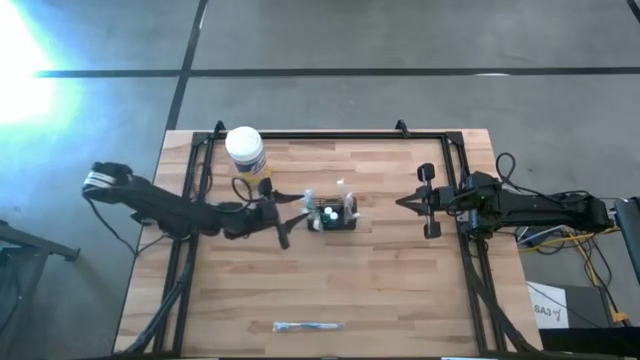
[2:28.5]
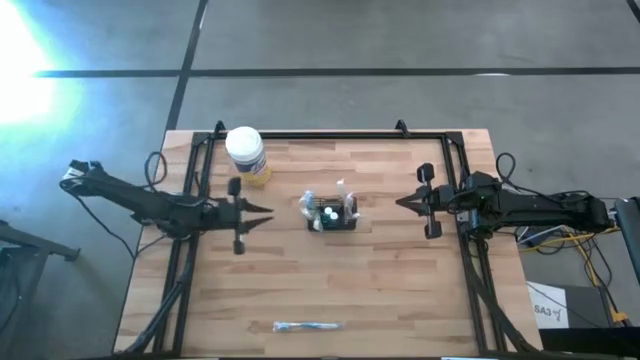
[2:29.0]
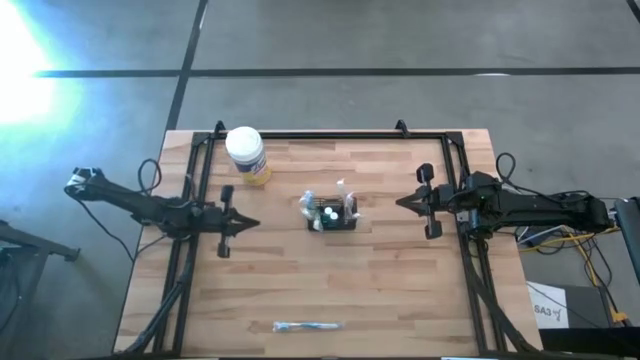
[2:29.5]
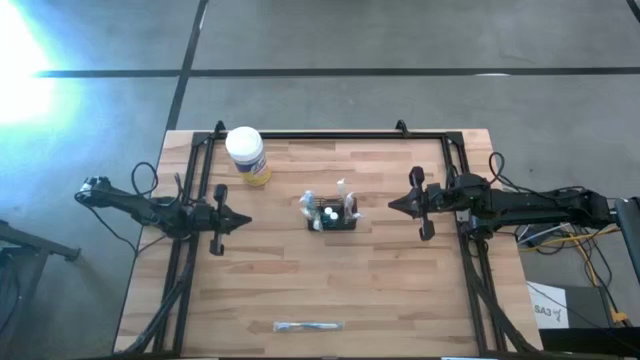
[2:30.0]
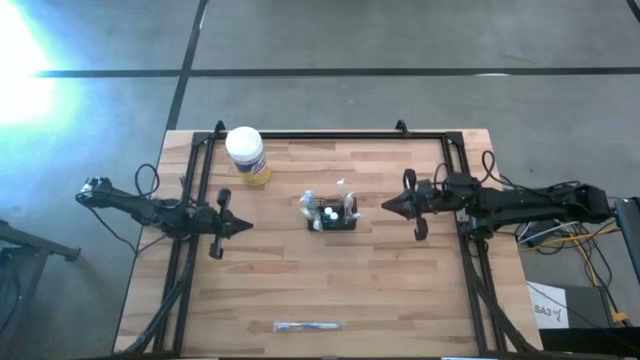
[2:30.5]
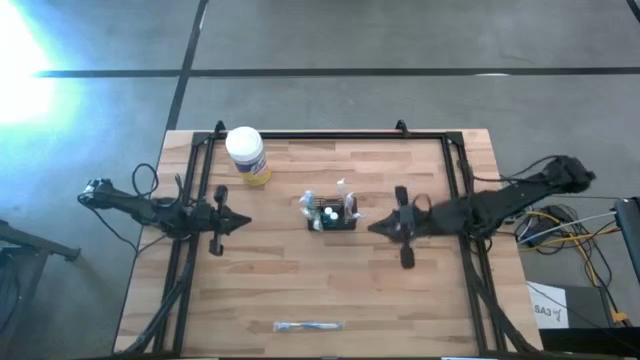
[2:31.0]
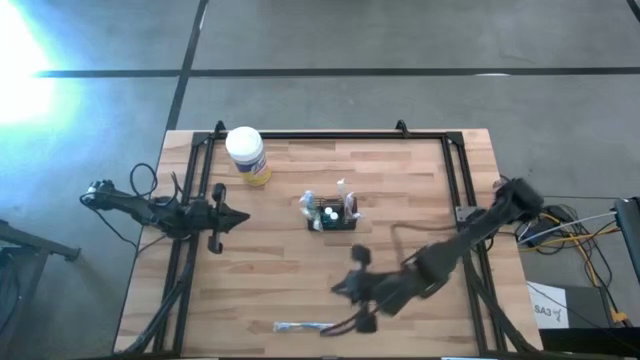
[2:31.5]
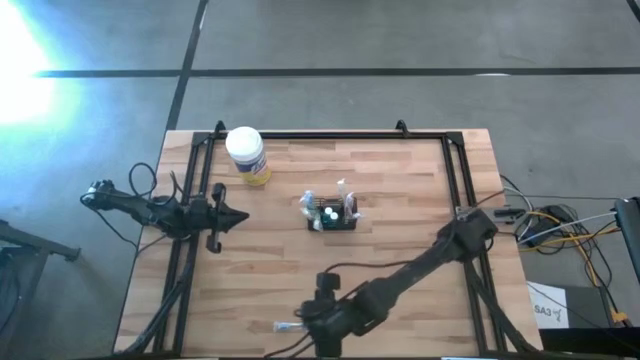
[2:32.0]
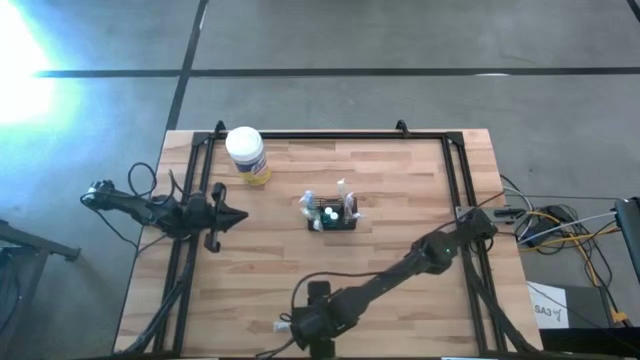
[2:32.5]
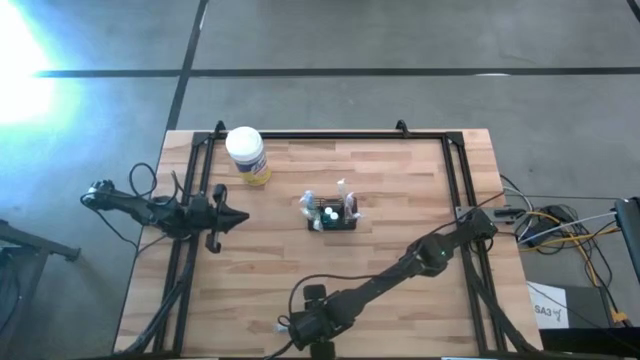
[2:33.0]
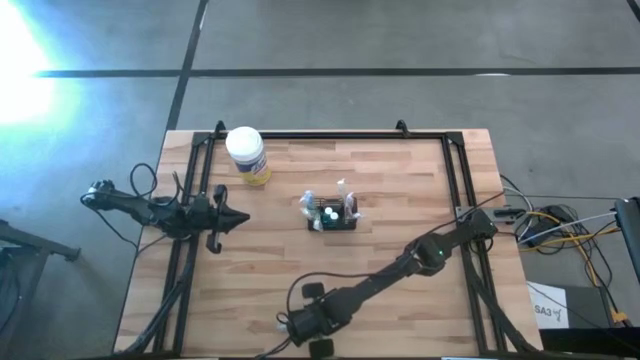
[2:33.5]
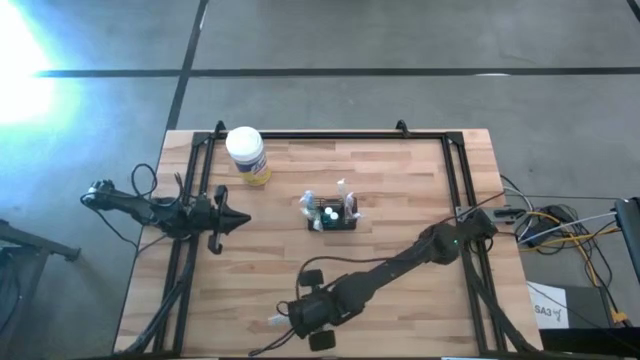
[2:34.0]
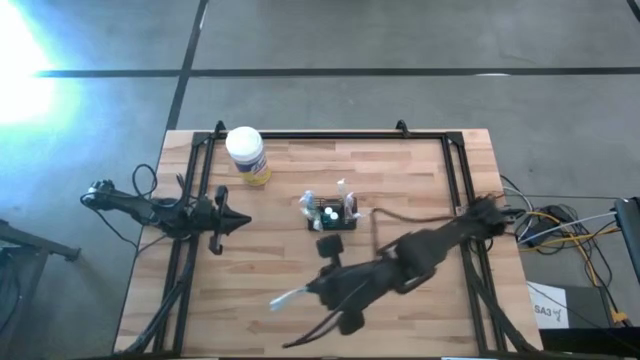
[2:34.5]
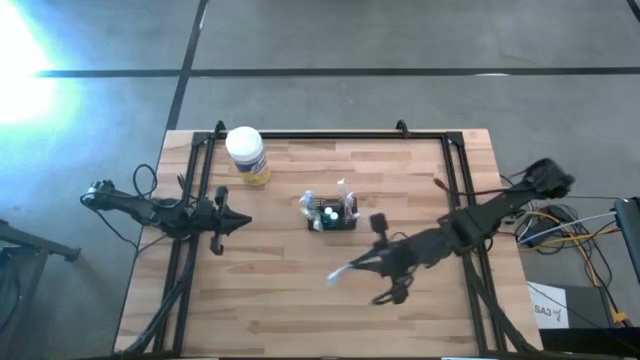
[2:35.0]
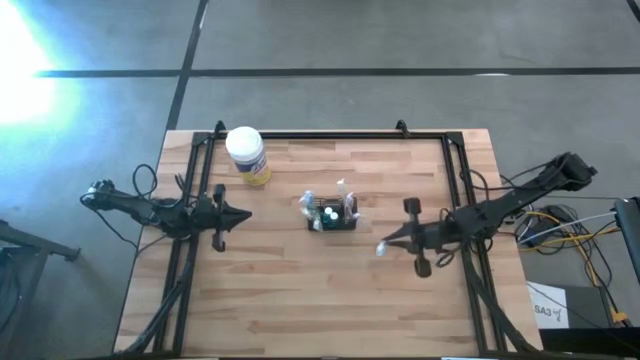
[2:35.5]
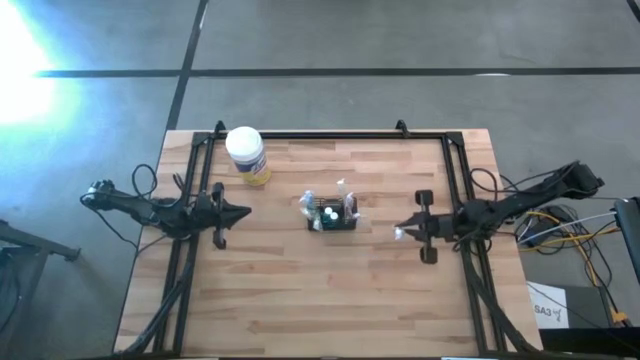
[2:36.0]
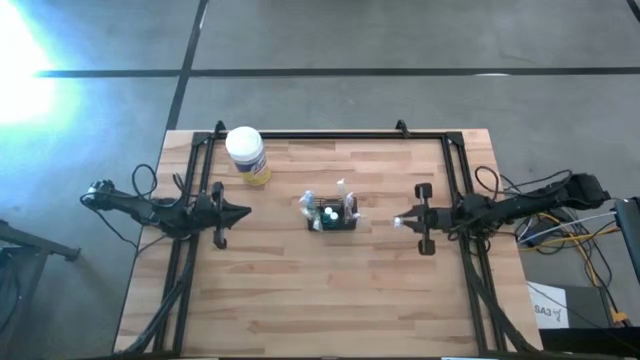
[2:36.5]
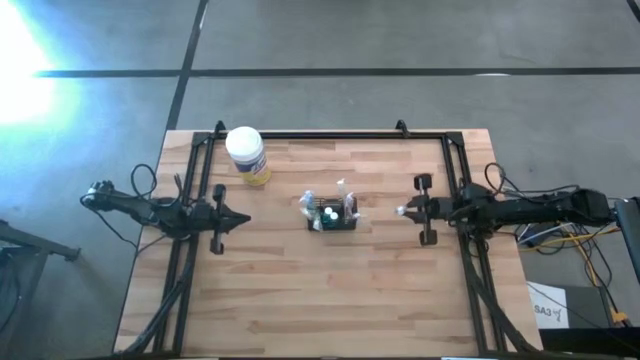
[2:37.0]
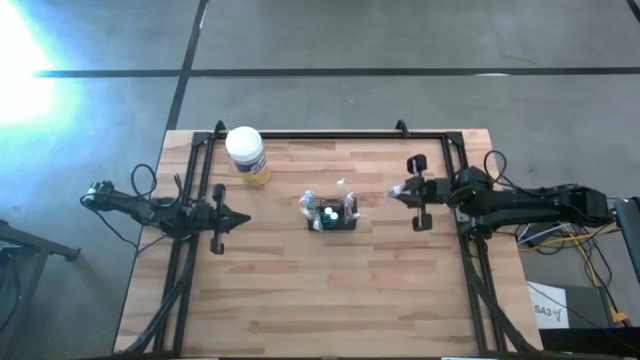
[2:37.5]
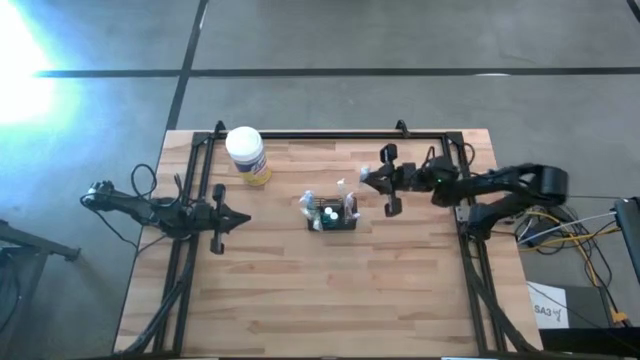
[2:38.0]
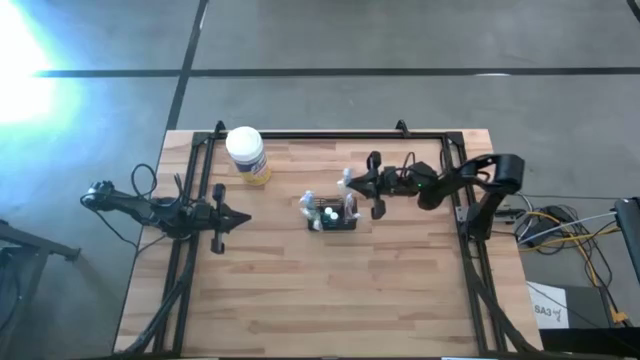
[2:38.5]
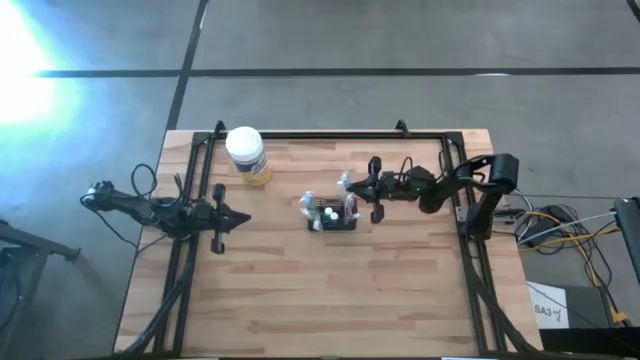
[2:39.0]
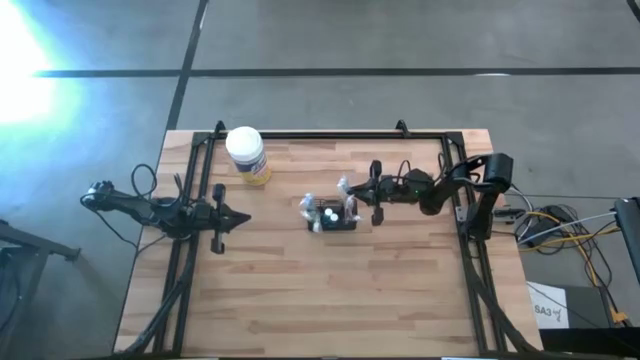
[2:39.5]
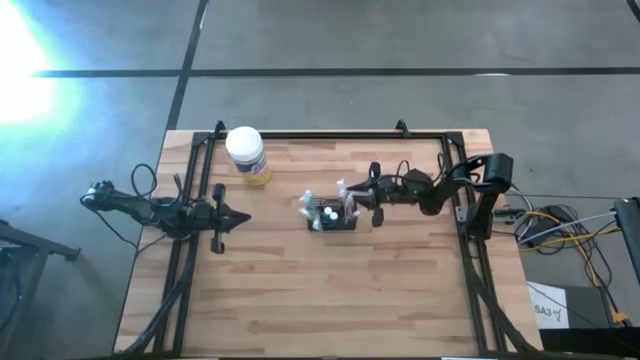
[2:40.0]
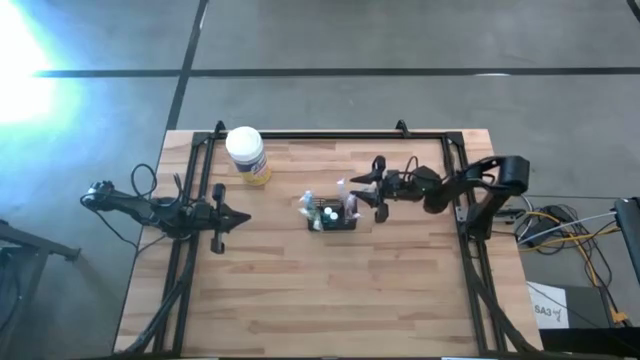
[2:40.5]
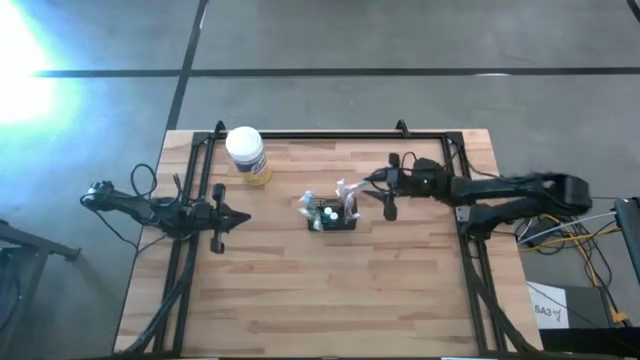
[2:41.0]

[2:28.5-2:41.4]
Task: Pick & Place toothbrushing station
Put the blue toothbrush into the black wire organizer

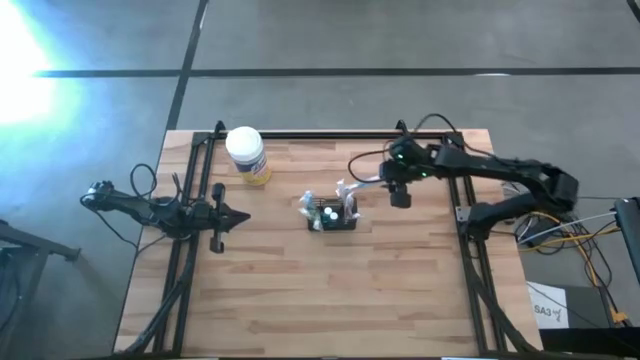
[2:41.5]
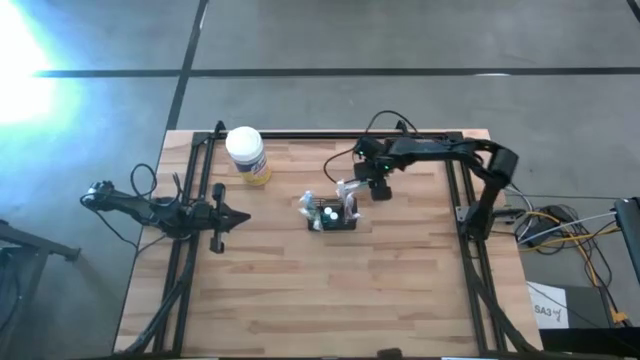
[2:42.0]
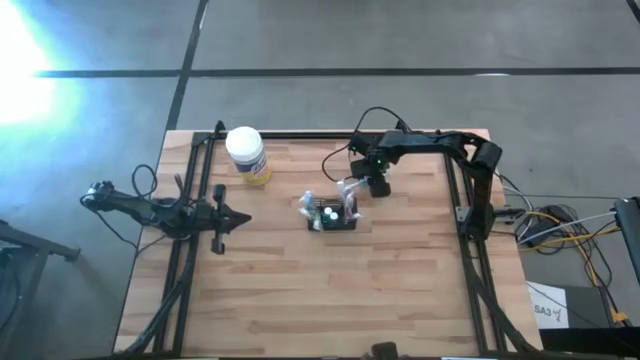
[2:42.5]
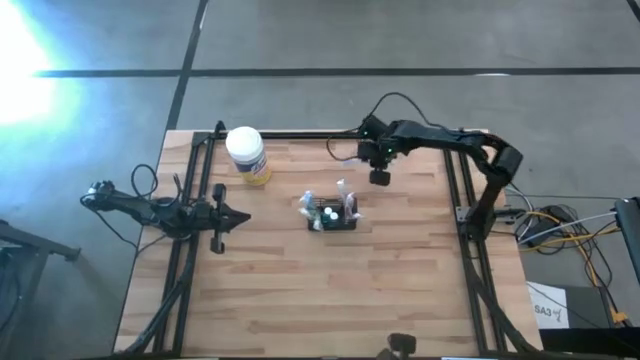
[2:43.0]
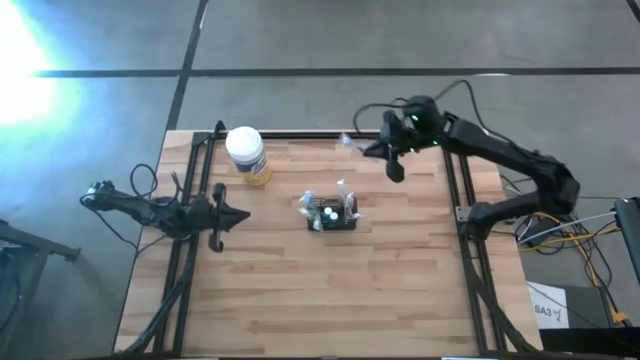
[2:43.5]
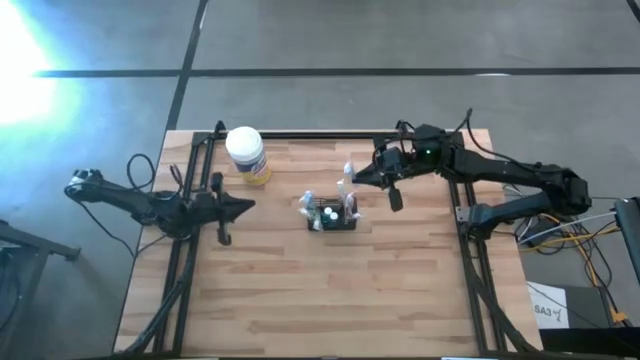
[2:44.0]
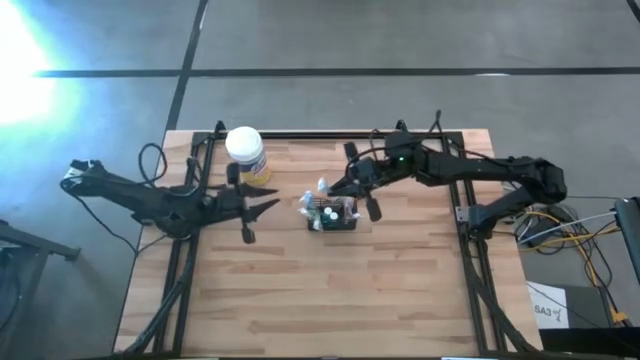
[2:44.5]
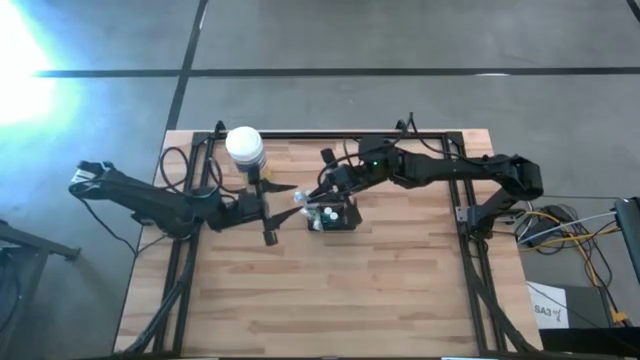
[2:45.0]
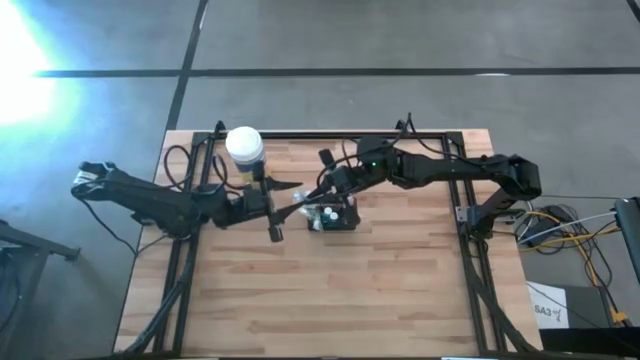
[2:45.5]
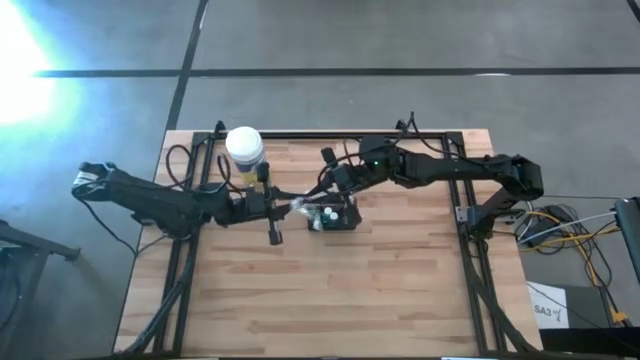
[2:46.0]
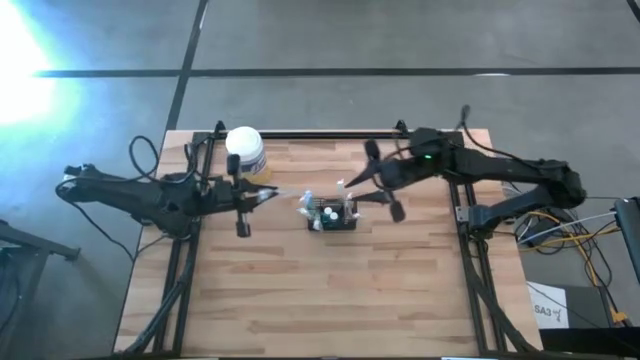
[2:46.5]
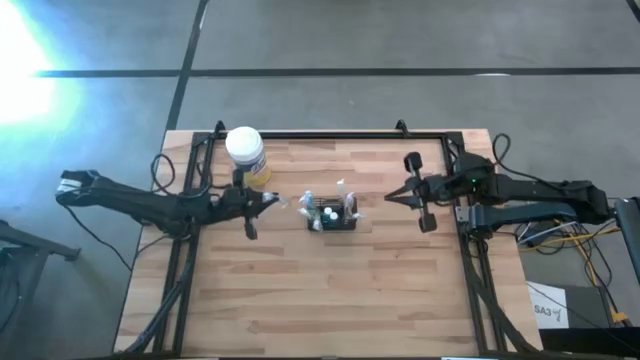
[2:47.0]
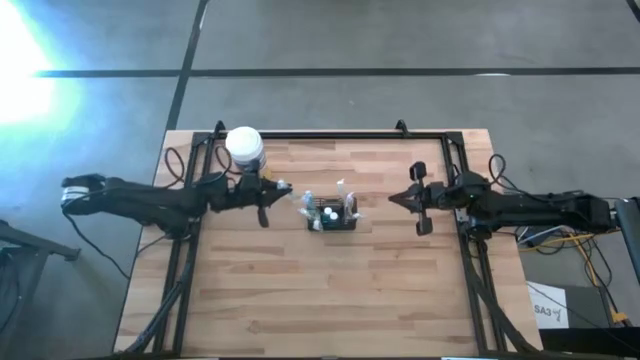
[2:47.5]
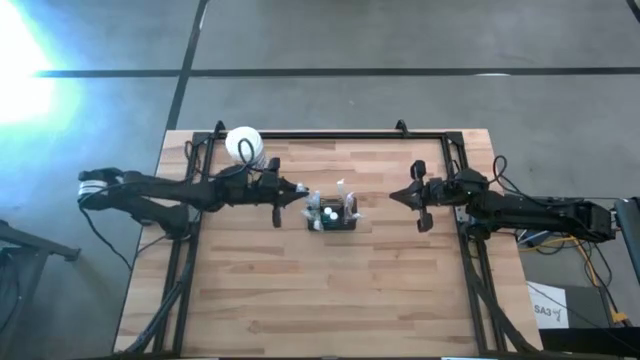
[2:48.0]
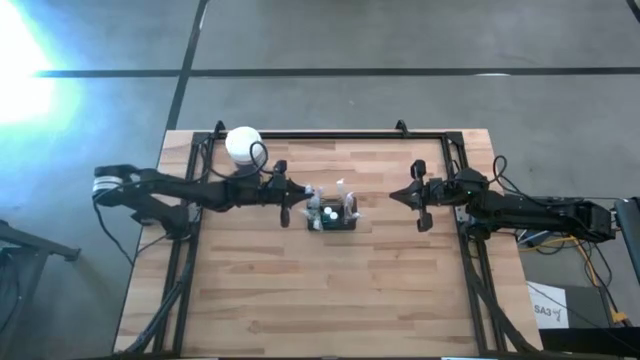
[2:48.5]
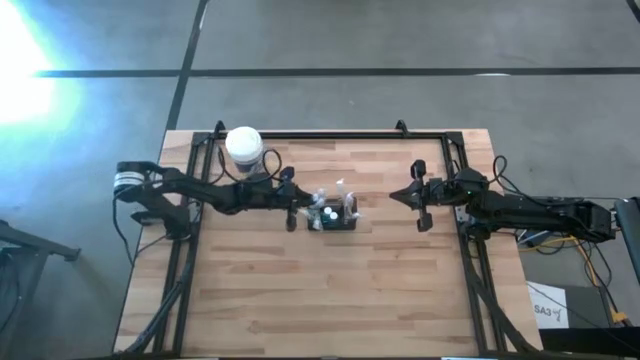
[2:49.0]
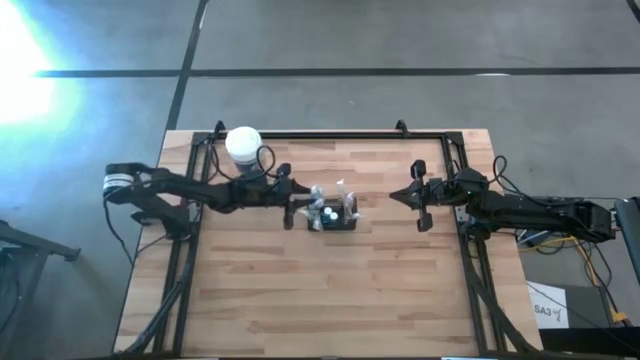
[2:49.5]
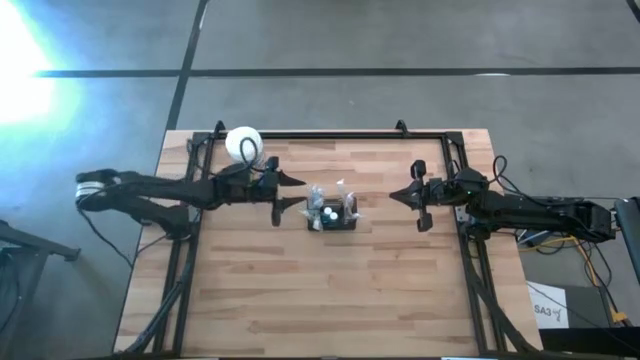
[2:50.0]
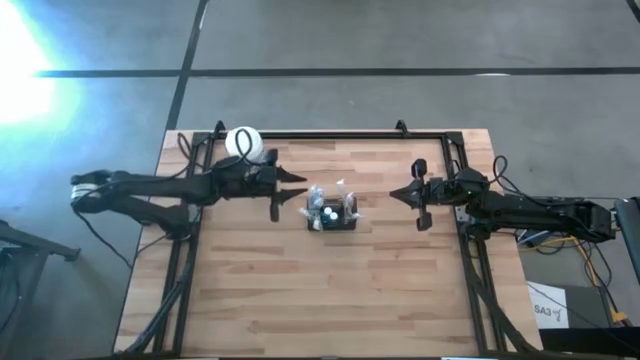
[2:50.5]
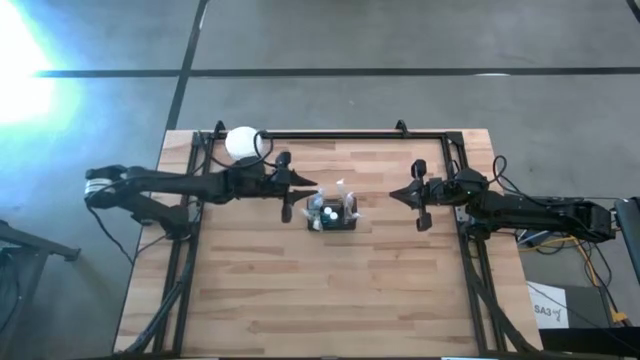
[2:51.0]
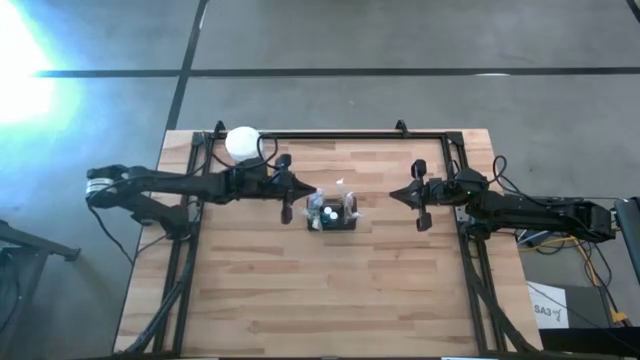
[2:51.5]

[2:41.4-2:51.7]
Put the blue toothbrush into the black wire organizer
